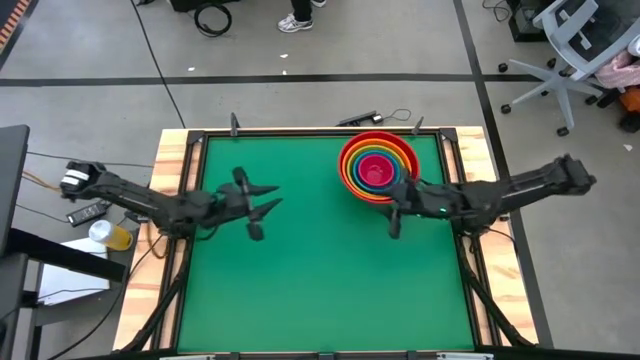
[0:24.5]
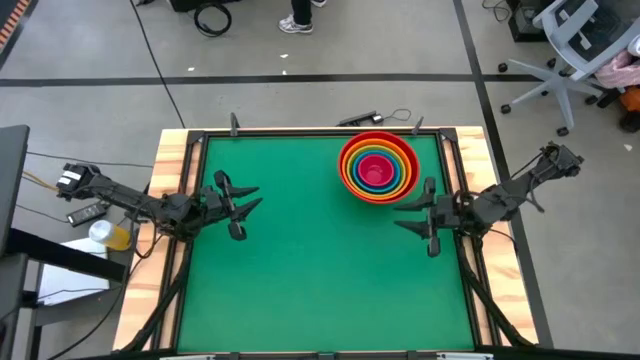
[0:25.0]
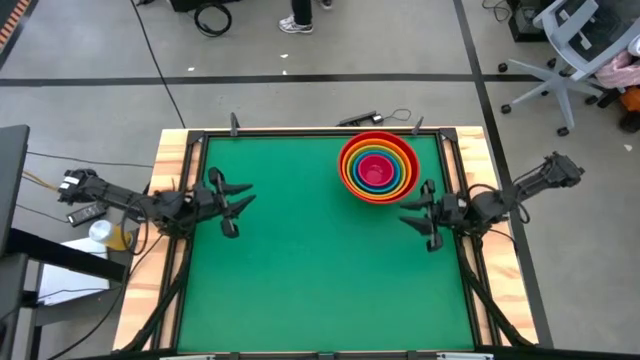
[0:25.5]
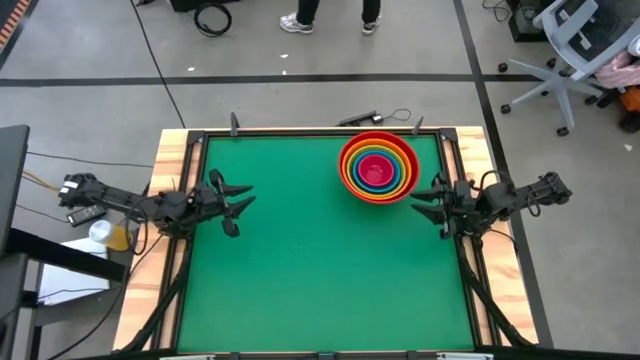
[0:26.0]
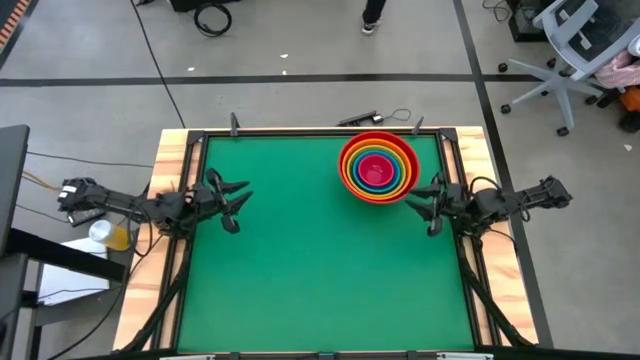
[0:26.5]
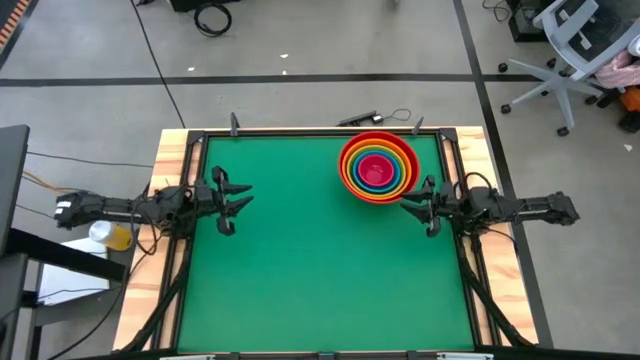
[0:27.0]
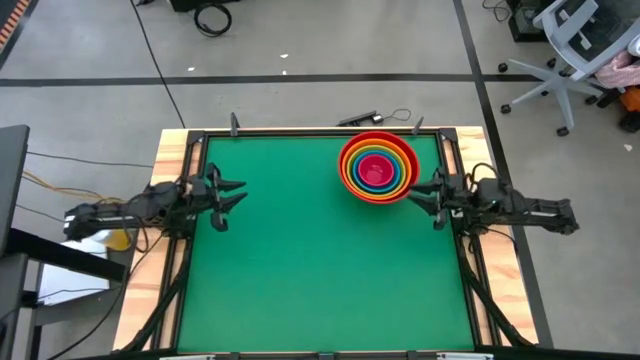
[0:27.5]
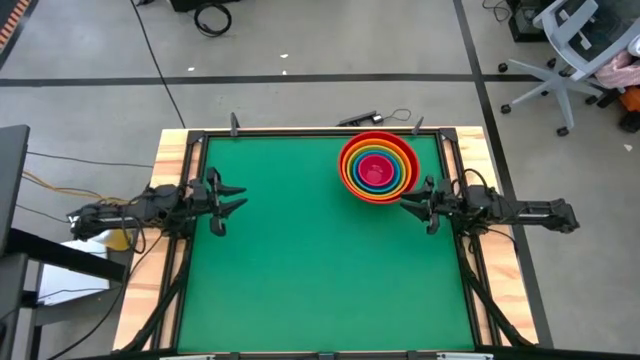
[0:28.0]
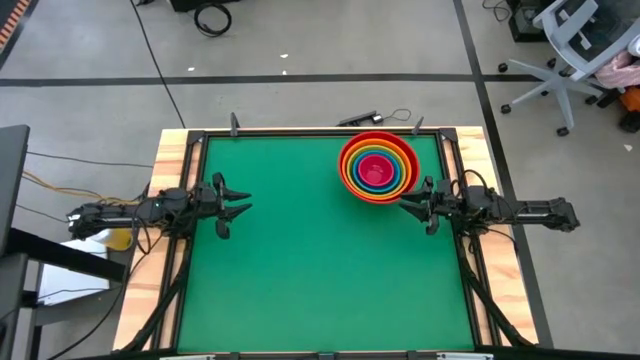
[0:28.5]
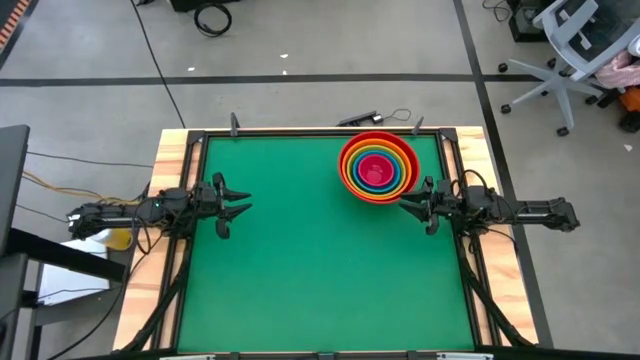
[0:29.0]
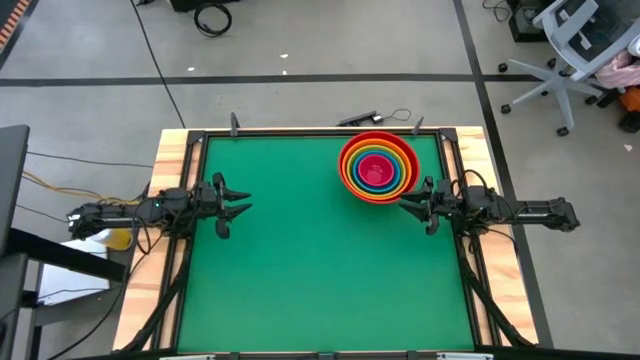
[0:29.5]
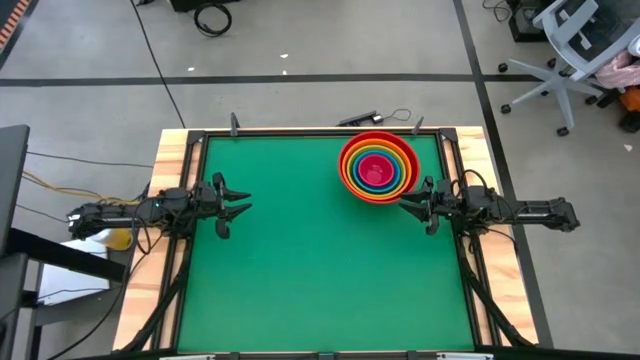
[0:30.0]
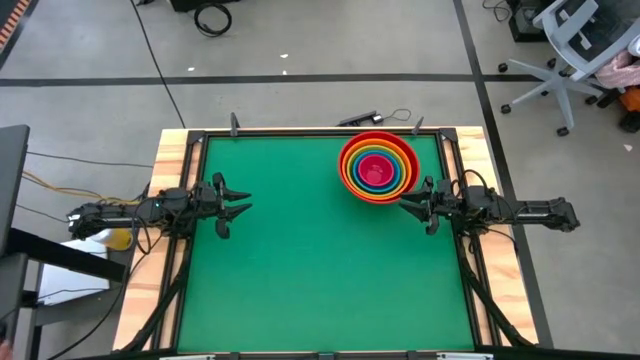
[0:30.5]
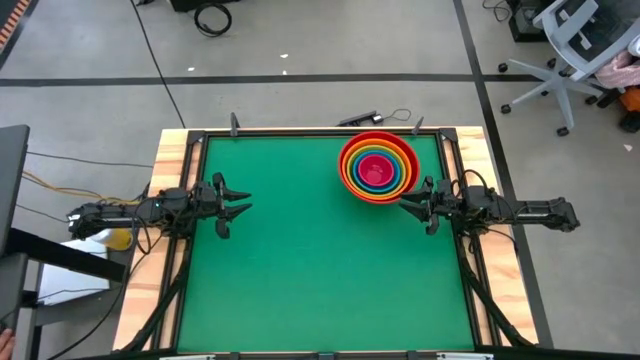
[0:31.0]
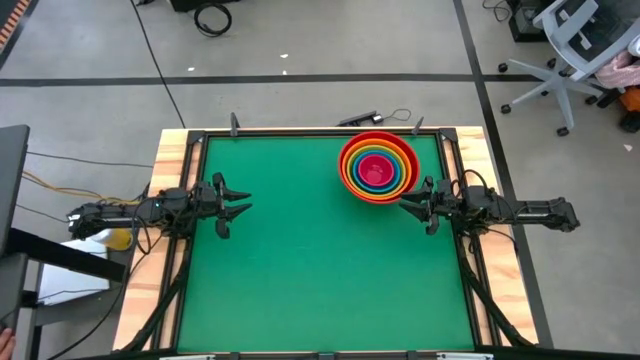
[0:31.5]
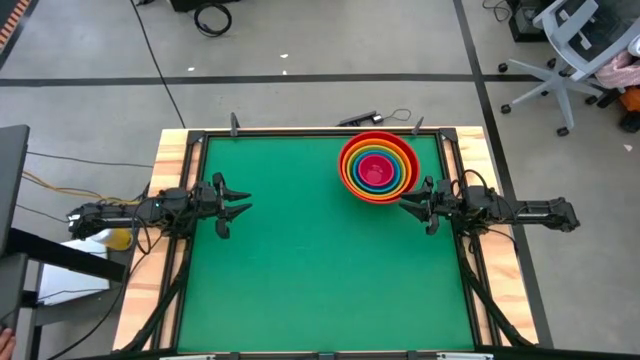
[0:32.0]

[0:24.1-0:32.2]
Return to Home Position

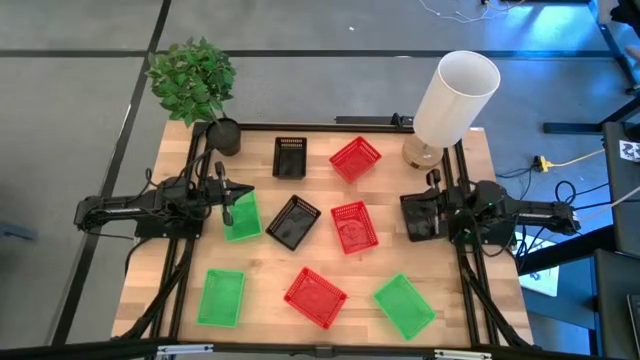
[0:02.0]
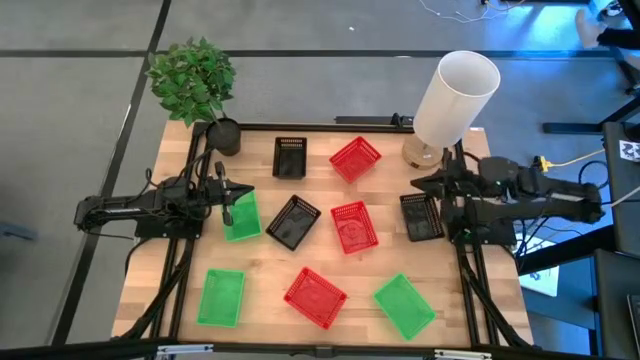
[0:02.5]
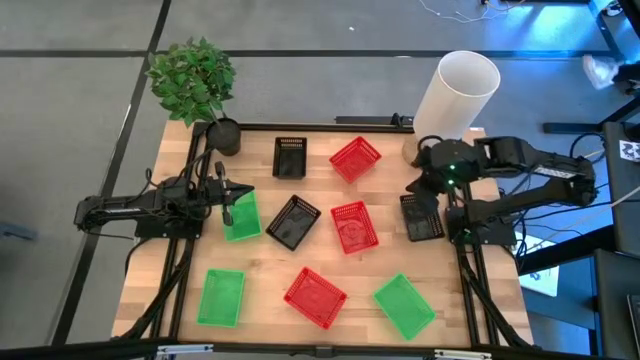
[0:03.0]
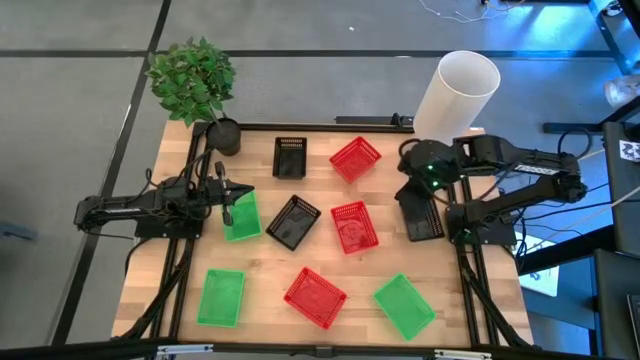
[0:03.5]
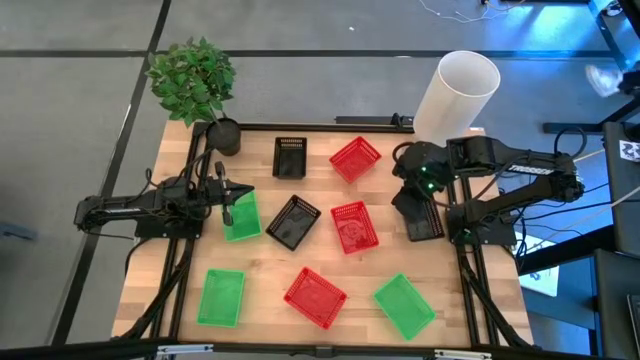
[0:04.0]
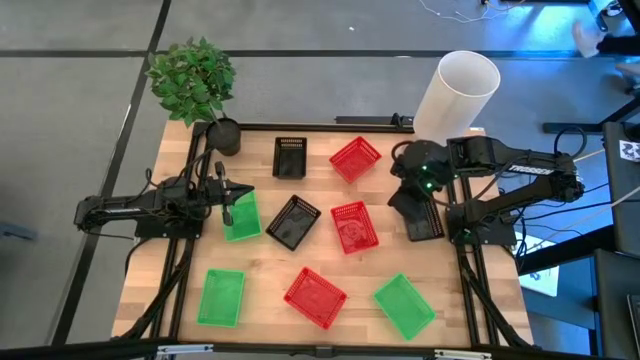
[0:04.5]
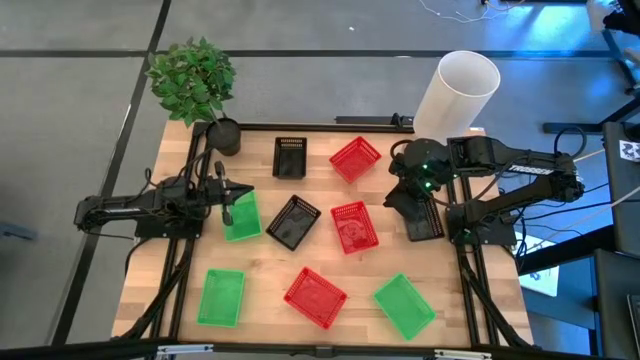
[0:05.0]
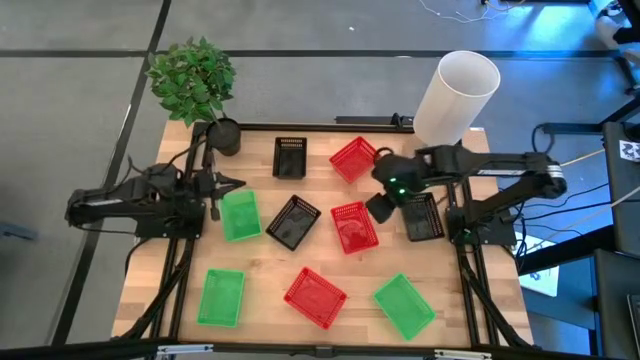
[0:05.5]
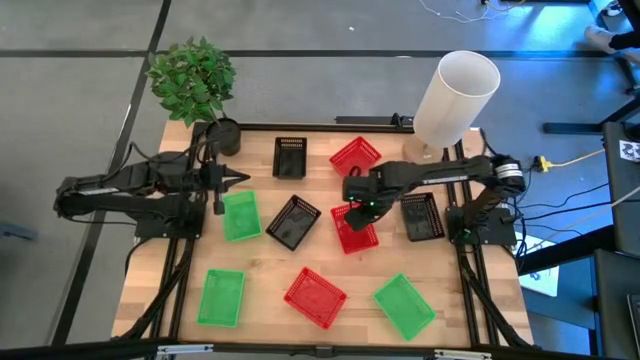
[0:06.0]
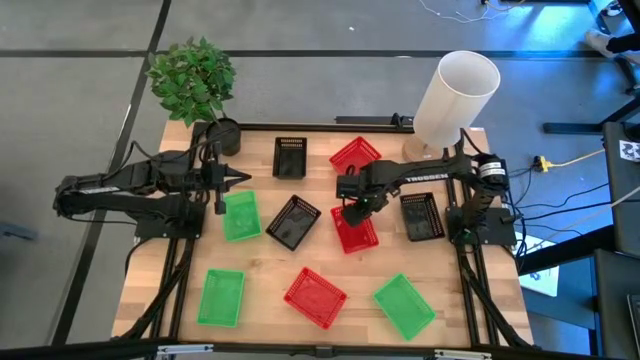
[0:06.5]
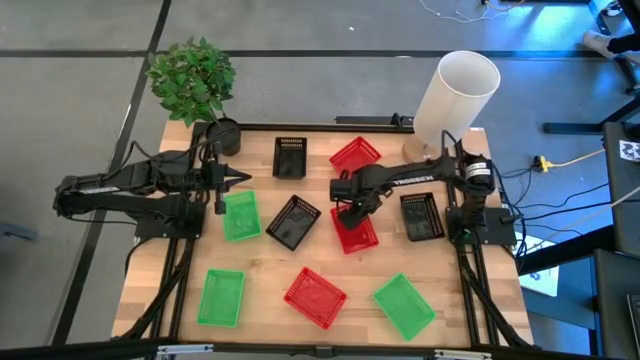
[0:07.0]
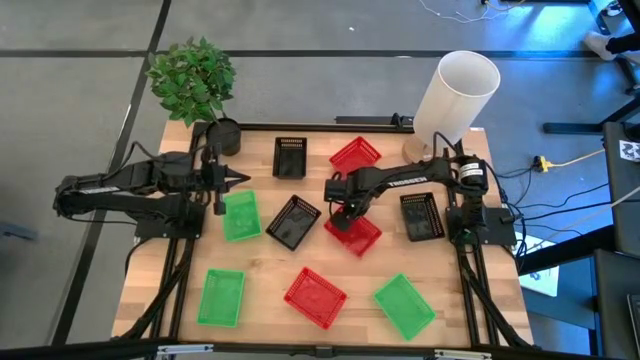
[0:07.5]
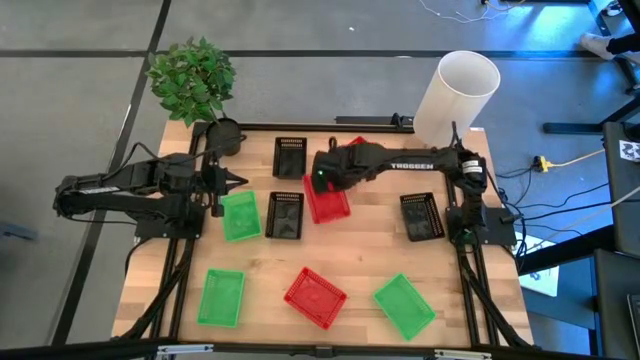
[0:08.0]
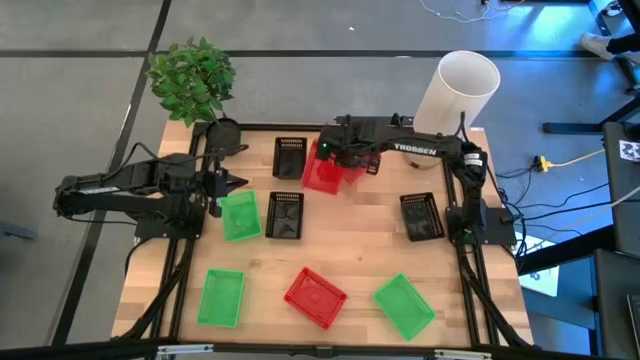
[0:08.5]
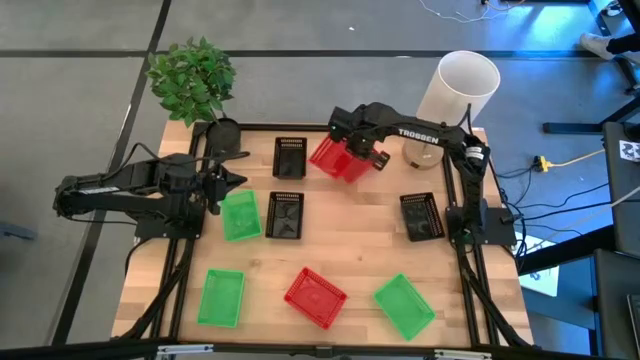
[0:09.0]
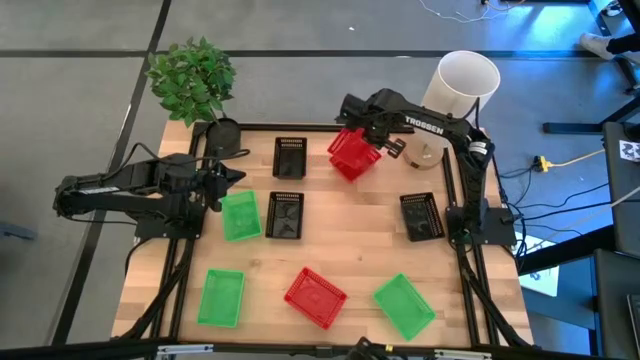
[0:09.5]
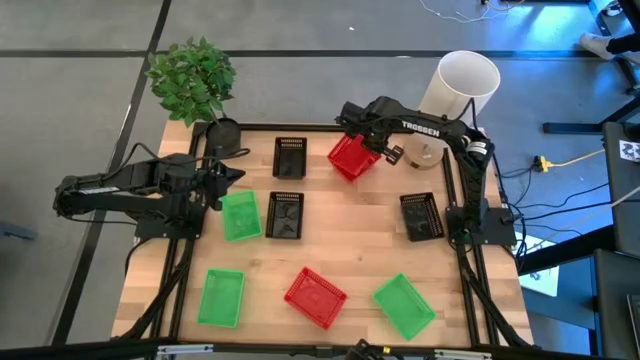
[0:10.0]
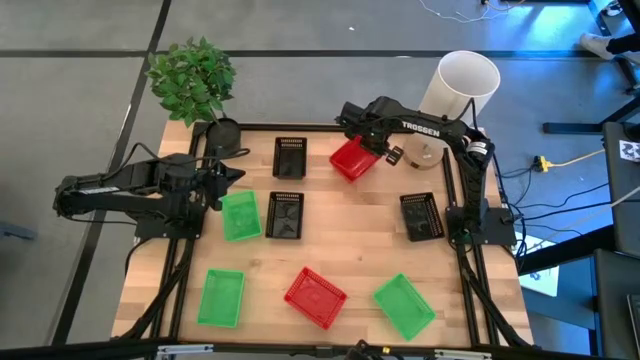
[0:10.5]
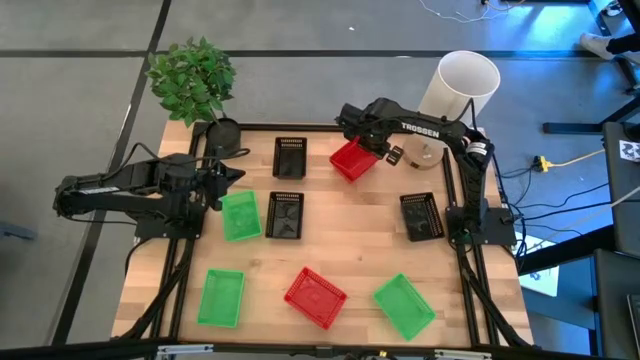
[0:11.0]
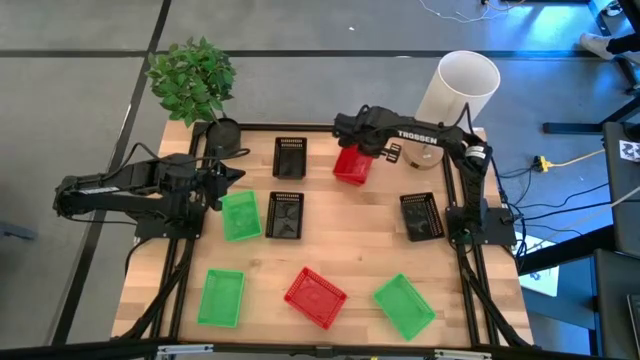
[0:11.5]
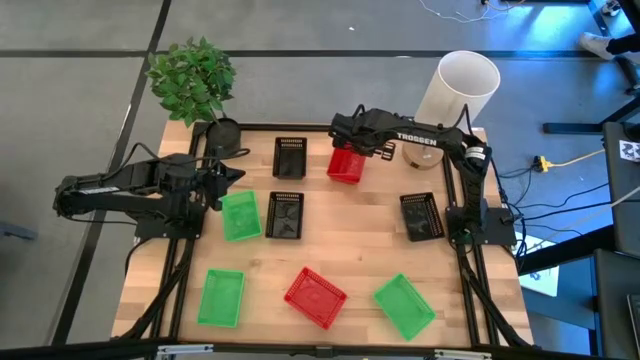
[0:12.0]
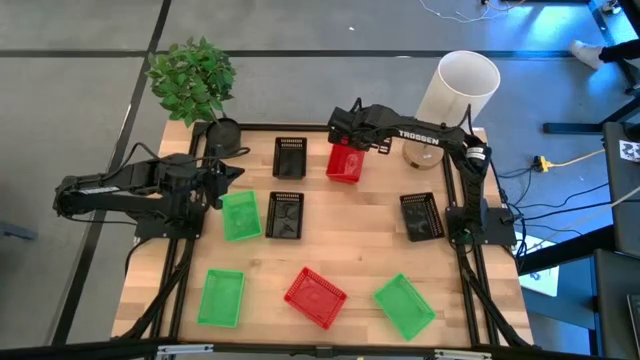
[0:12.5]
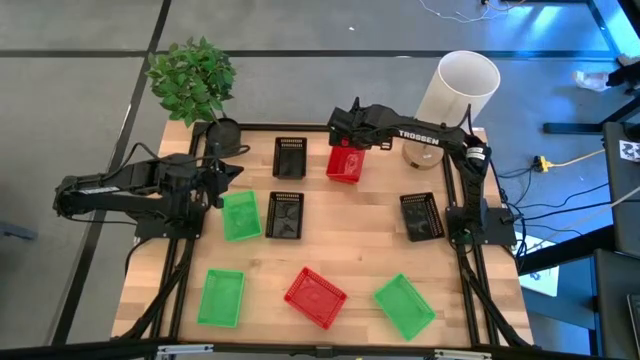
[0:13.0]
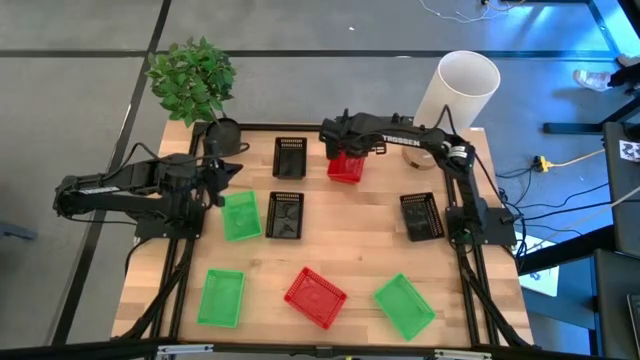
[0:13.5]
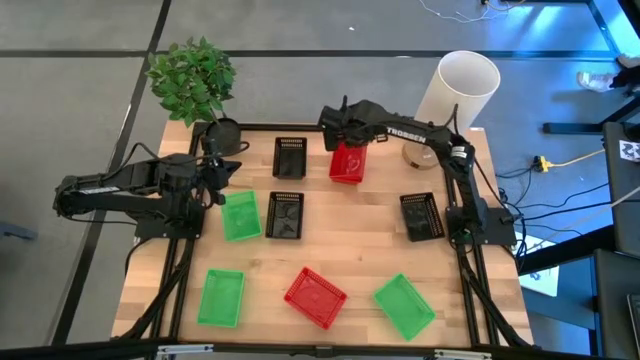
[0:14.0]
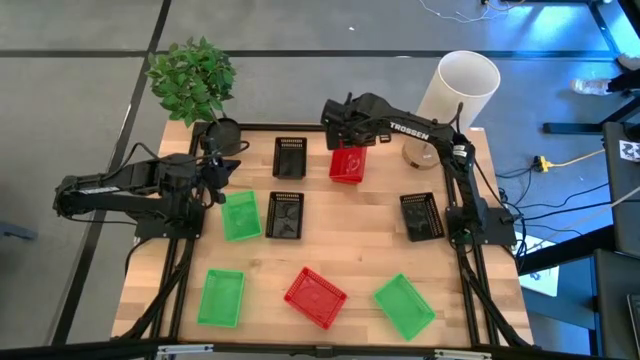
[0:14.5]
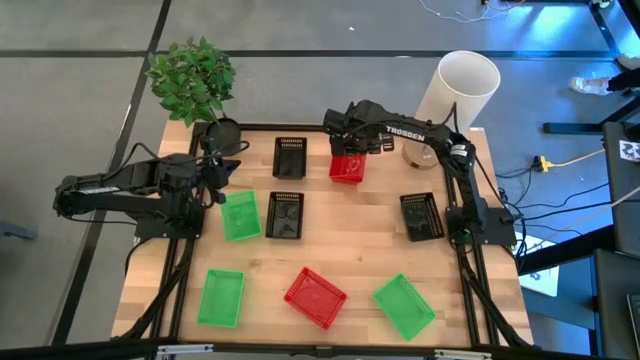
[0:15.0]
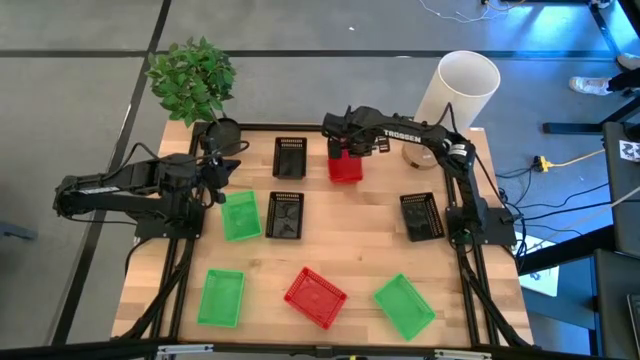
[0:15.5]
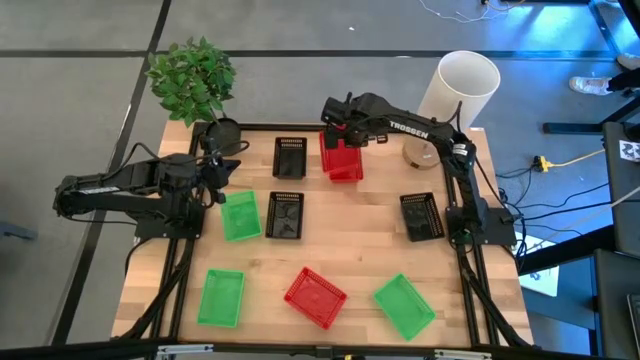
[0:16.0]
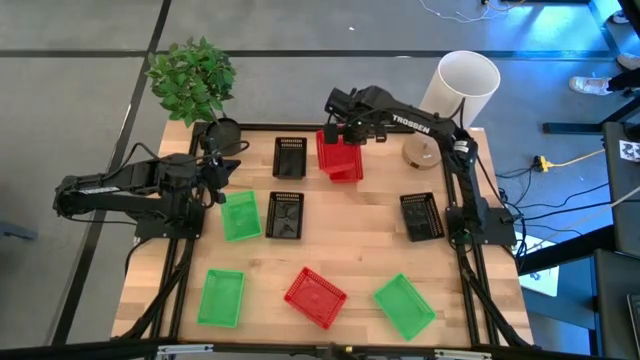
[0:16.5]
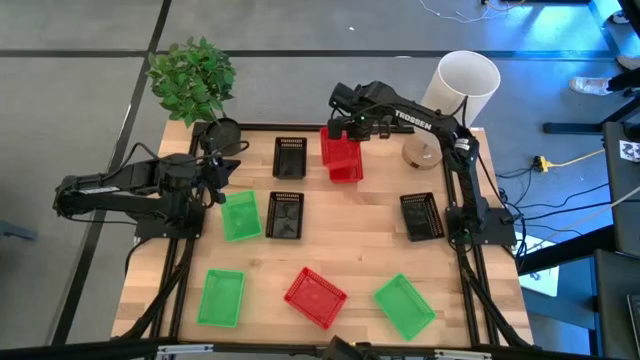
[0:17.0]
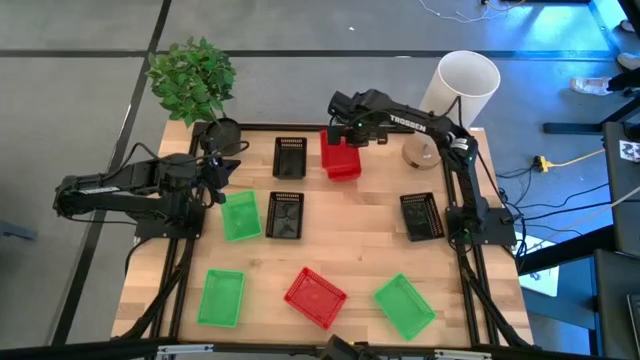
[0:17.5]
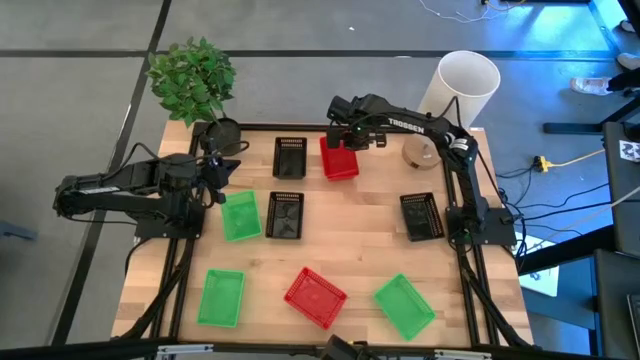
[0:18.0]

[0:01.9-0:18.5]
Stack the middle red bin on the top red bin
